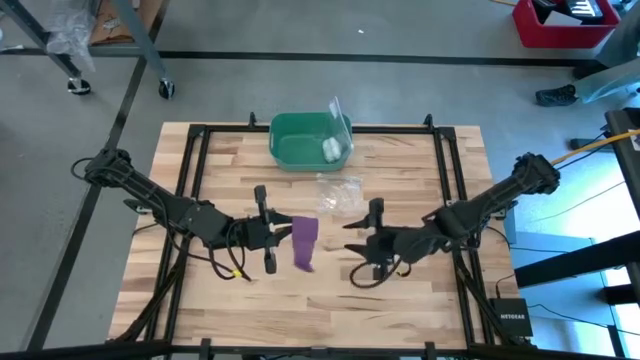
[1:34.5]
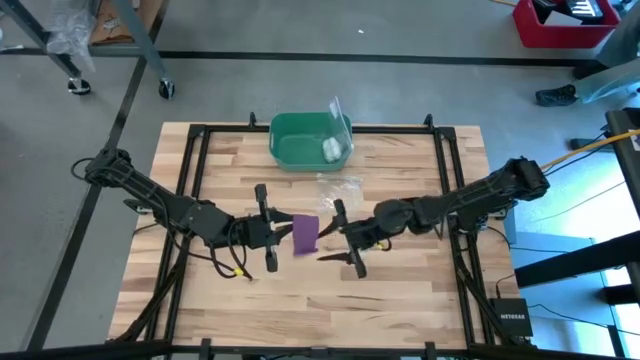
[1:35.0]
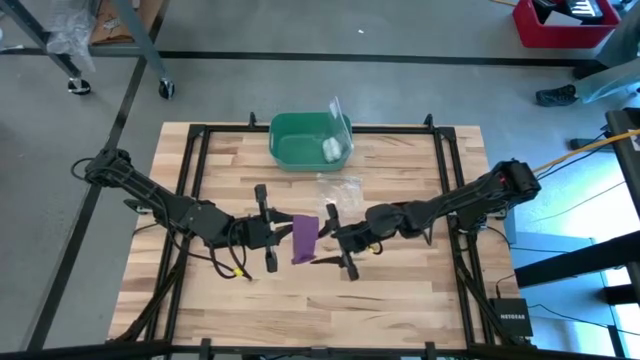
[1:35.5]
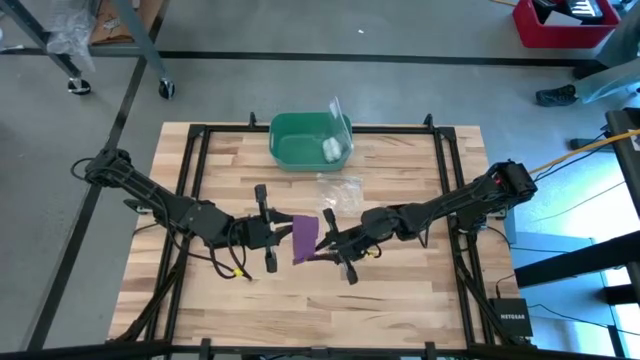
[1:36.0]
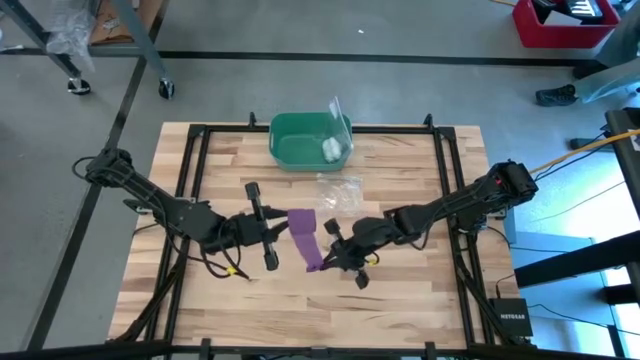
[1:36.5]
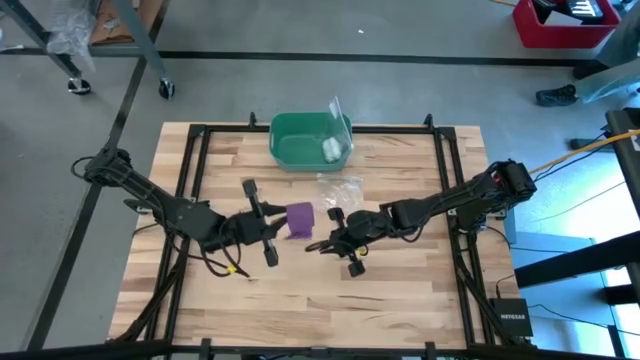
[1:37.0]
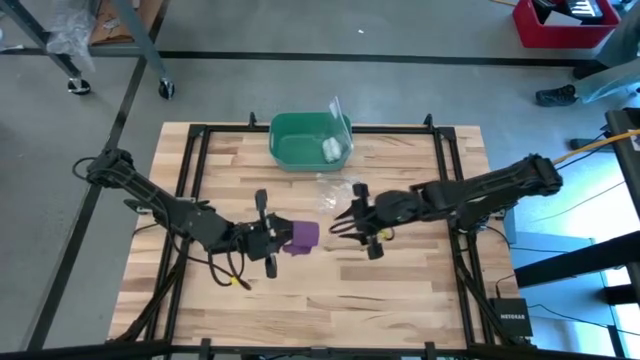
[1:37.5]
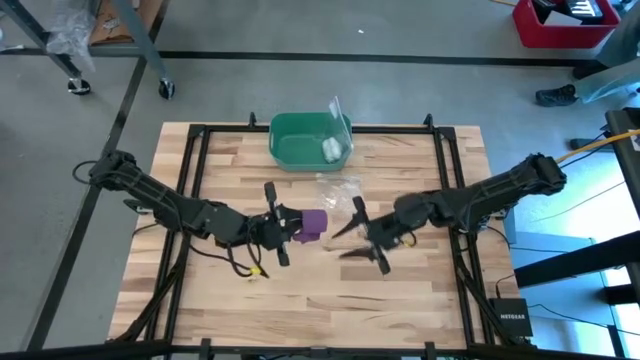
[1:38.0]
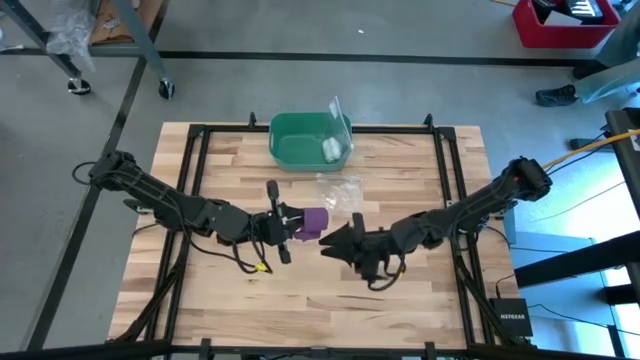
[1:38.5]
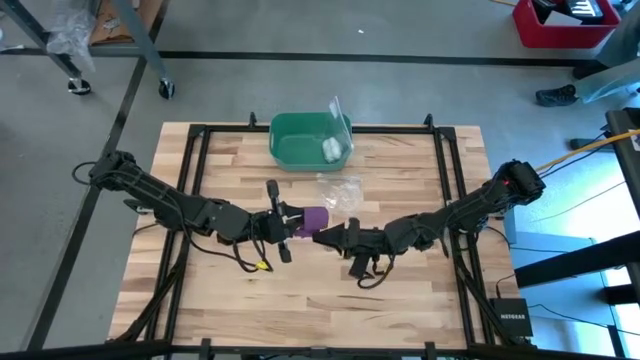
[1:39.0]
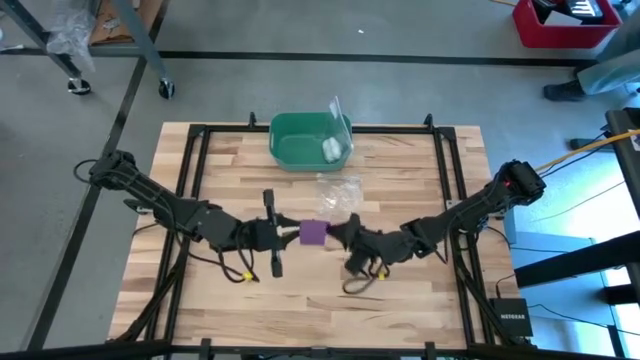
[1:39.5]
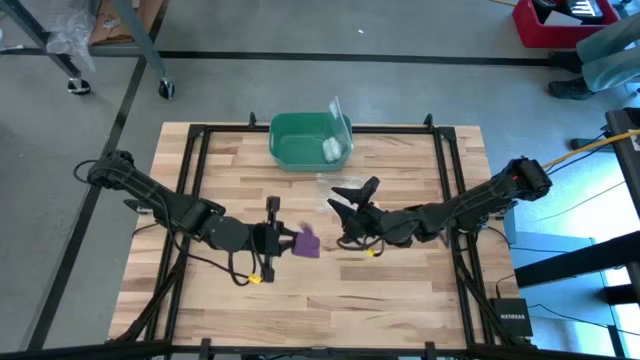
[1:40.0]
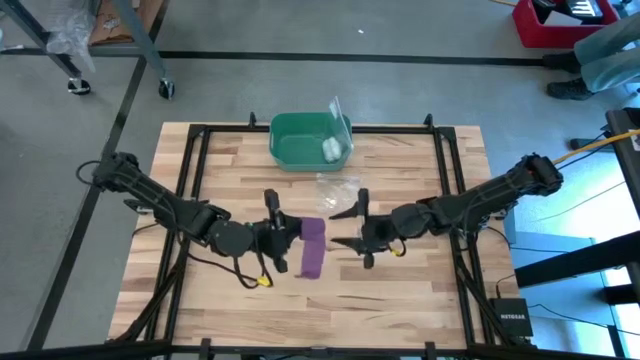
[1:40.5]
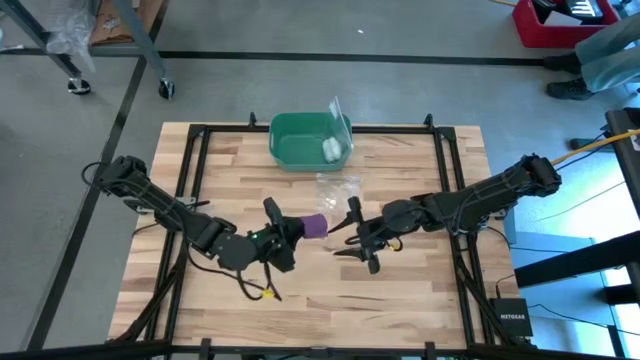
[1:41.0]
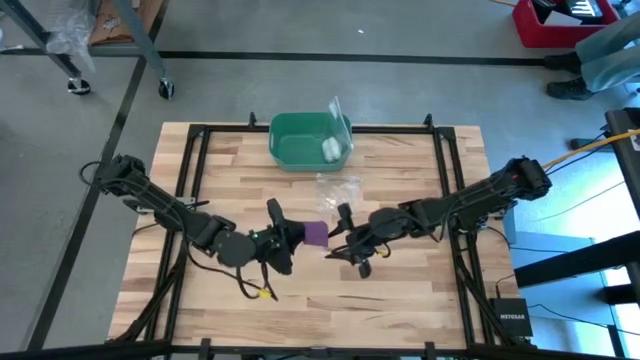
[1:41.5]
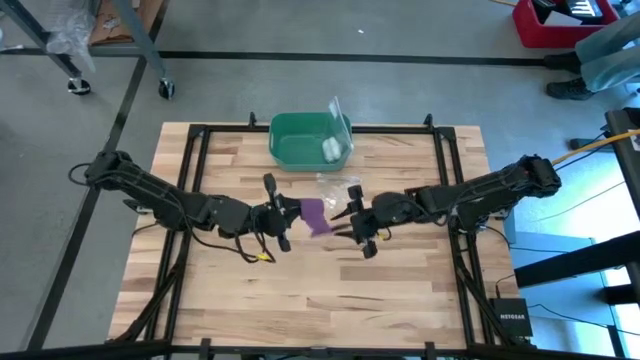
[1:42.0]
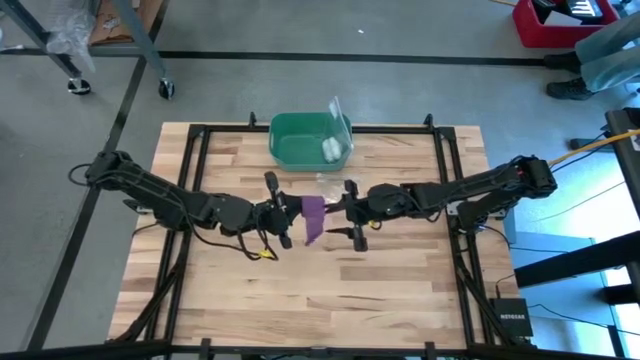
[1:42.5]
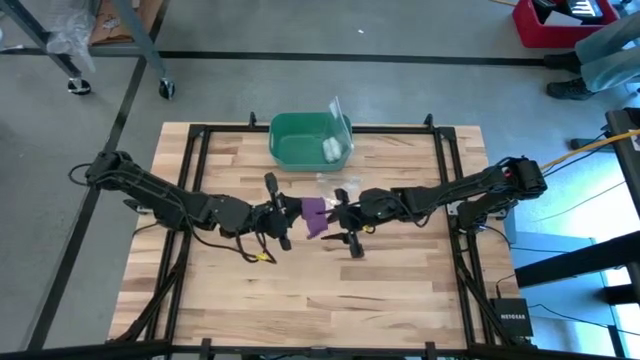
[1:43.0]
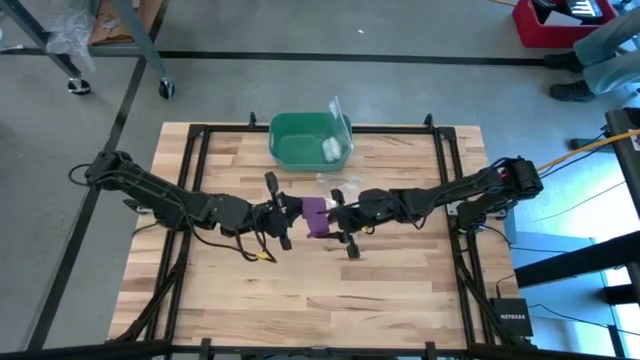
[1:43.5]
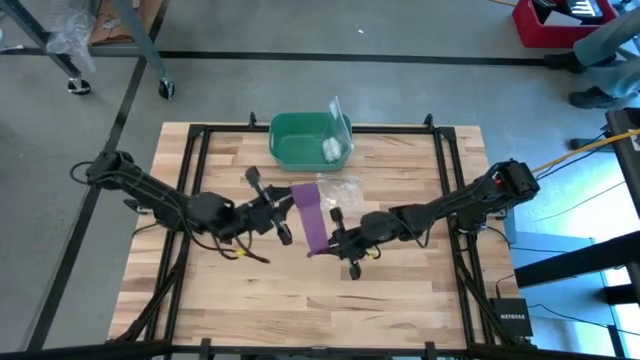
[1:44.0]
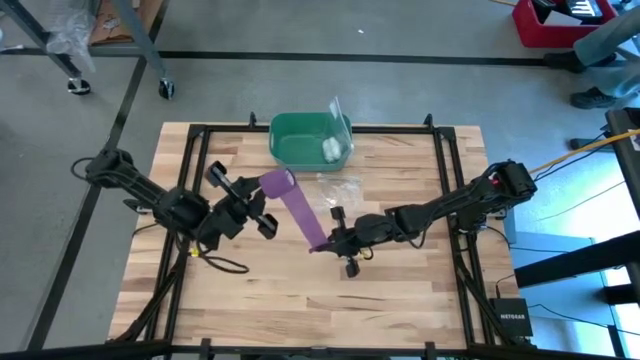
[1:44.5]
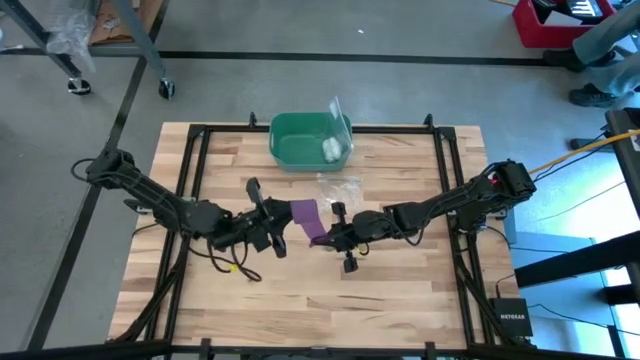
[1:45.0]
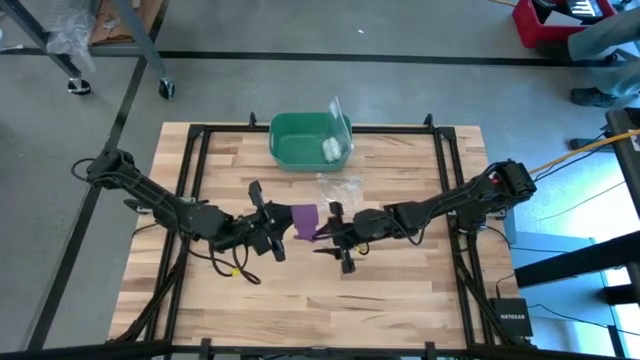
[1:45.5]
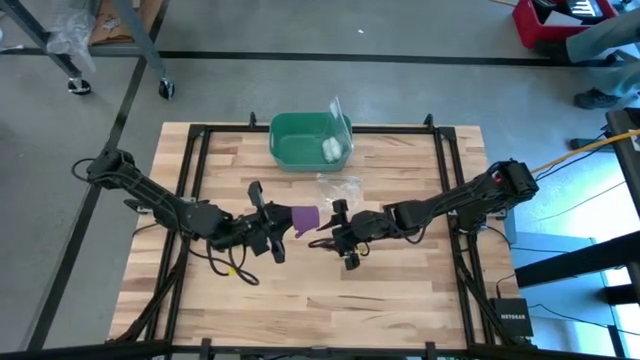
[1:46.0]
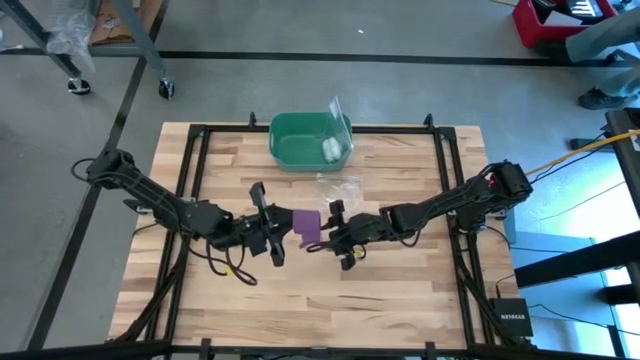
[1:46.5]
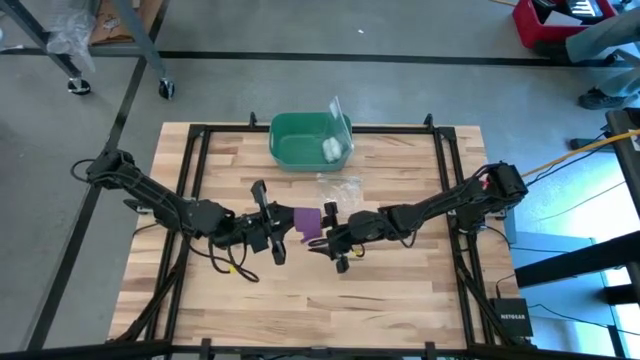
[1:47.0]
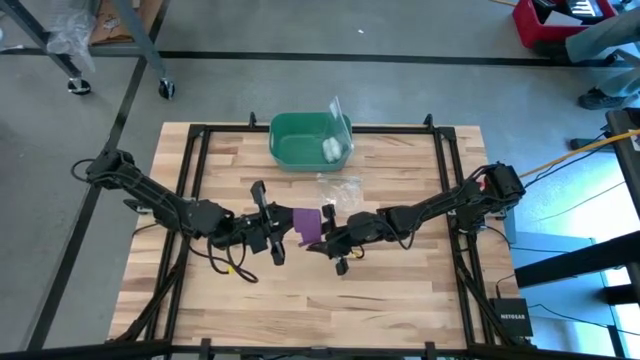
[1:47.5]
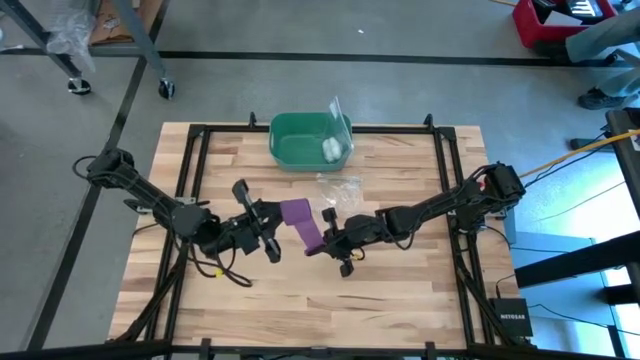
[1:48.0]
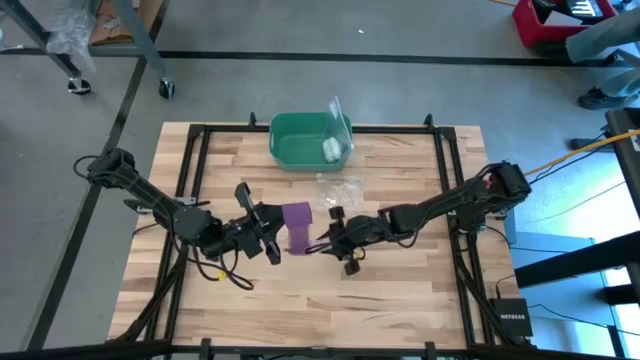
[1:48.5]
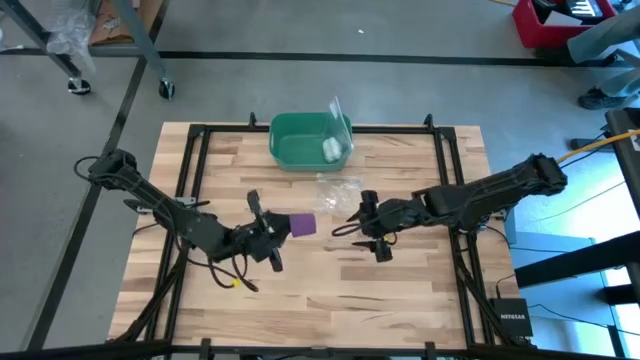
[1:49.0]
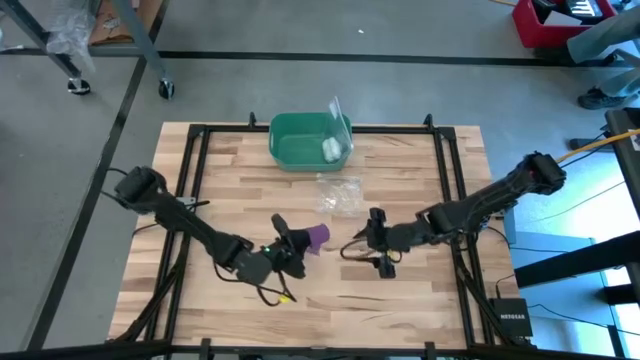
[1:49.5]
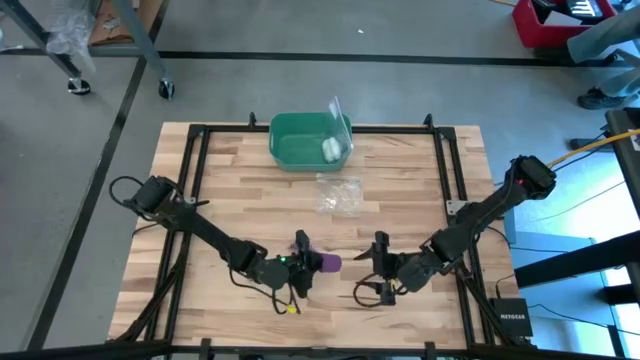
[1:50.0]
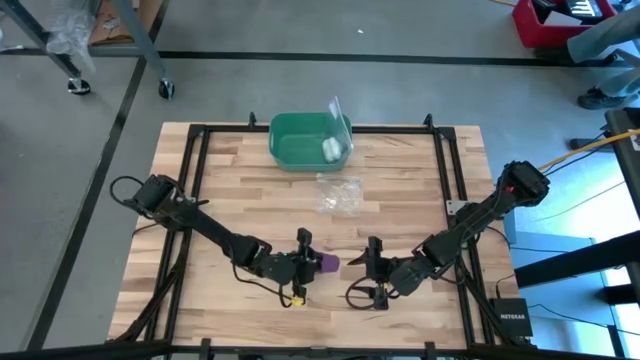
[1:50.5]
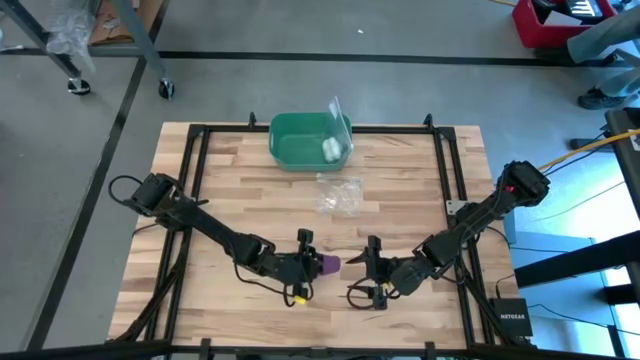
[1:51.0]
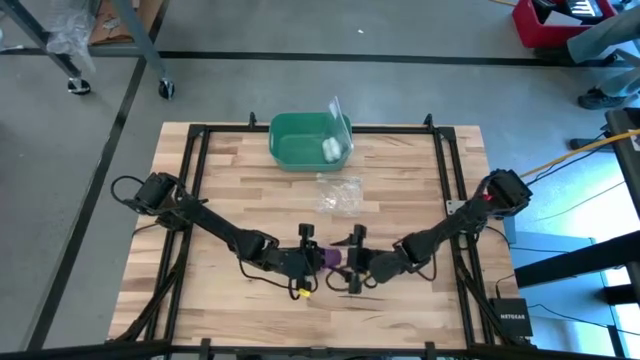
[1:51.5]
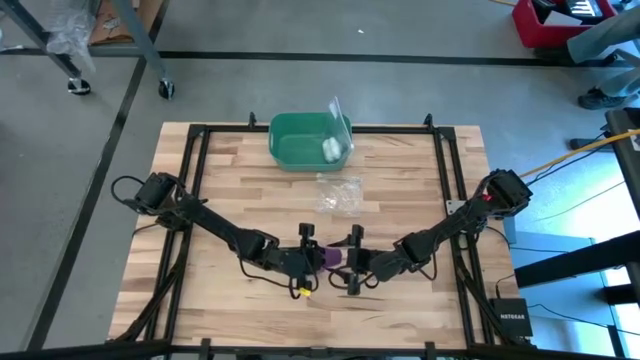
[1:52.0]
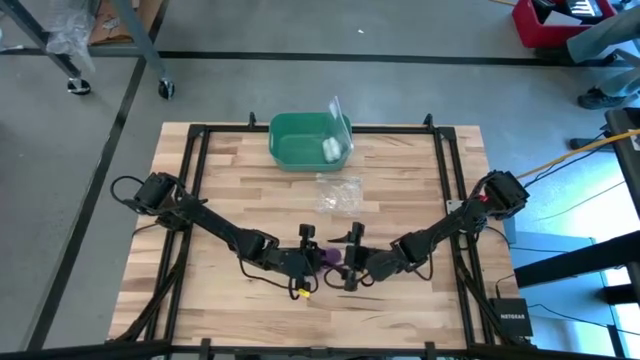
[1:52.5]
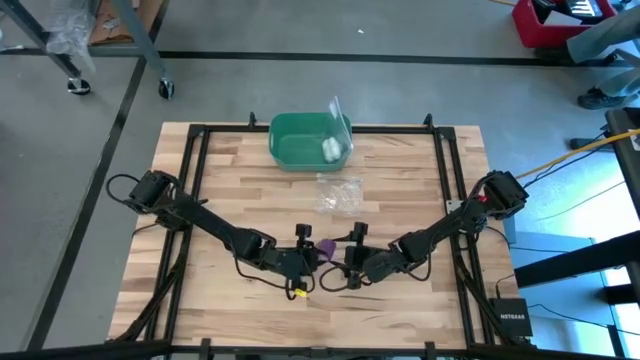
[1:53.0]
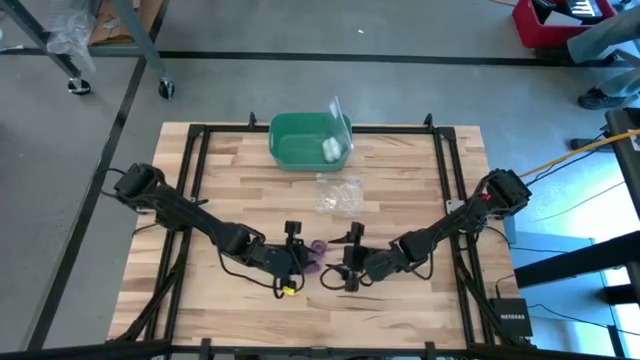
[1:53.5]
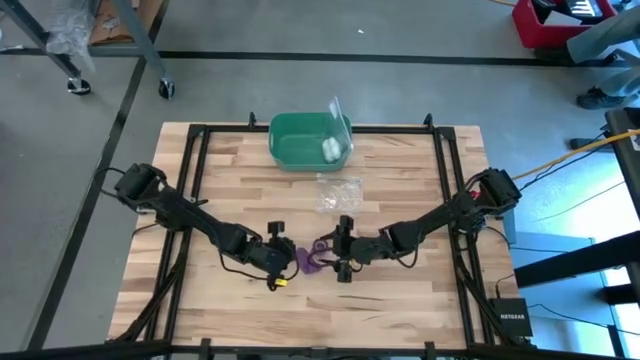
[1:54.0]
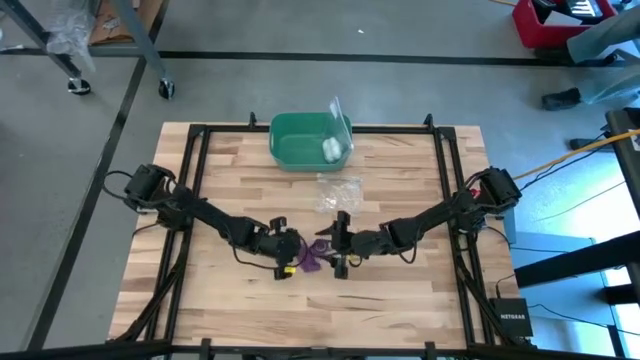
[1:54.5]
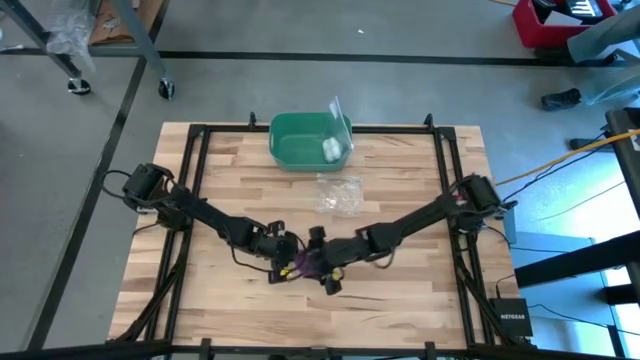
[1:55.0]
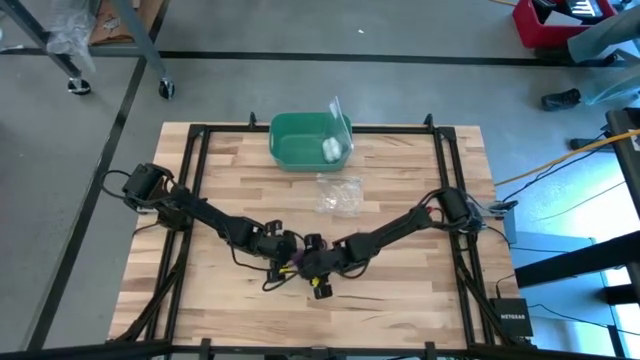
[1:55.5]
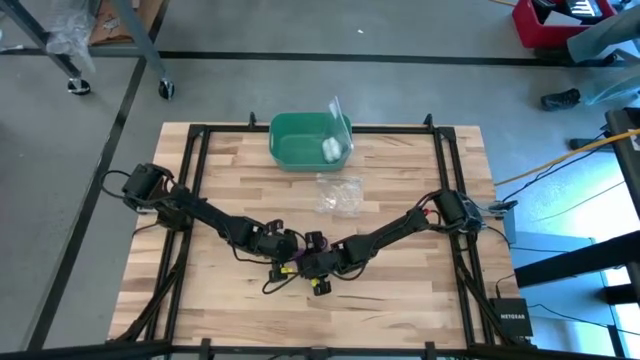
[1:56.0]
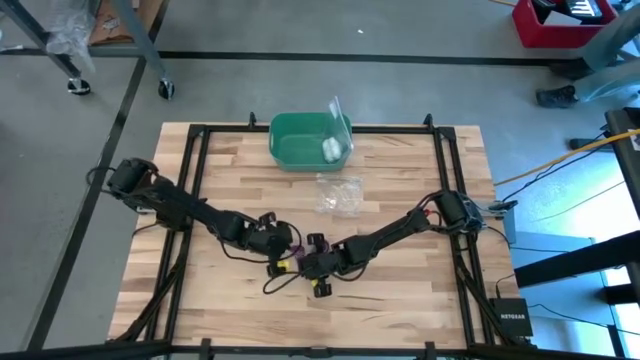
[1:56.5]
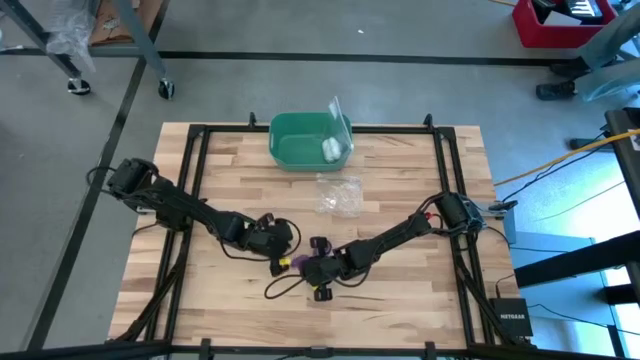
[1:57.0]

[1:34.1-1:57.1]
Task: Roll bandage
Roll the violet bandage
